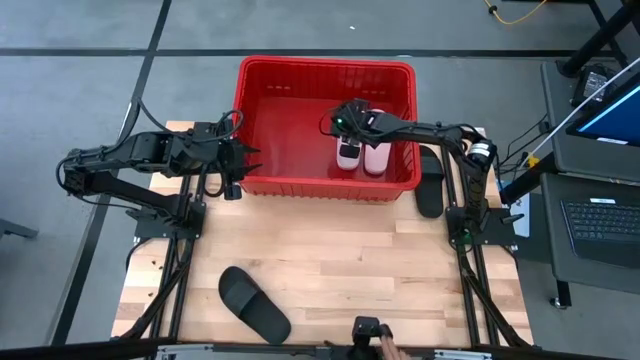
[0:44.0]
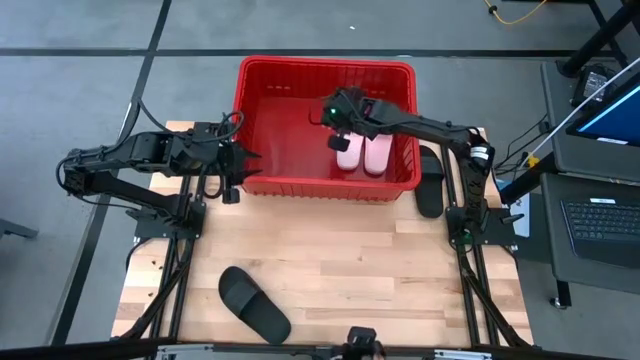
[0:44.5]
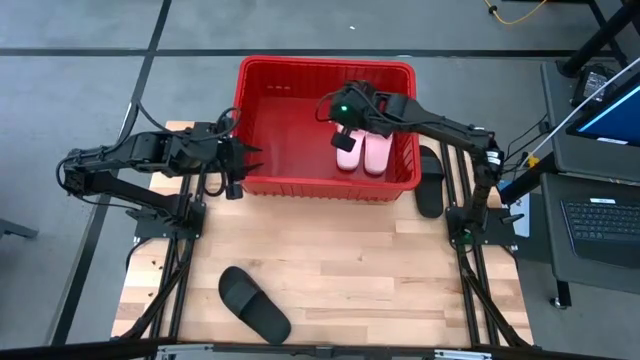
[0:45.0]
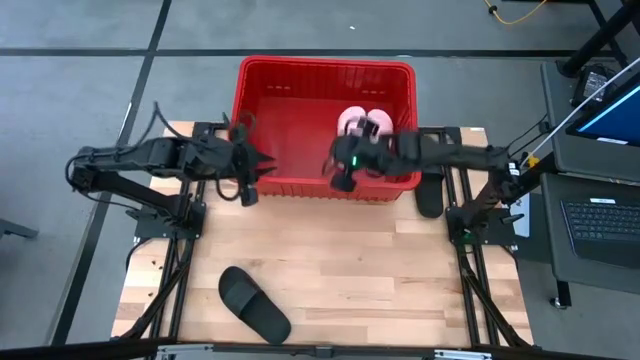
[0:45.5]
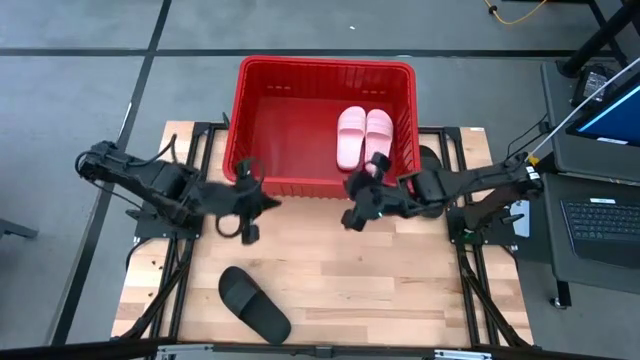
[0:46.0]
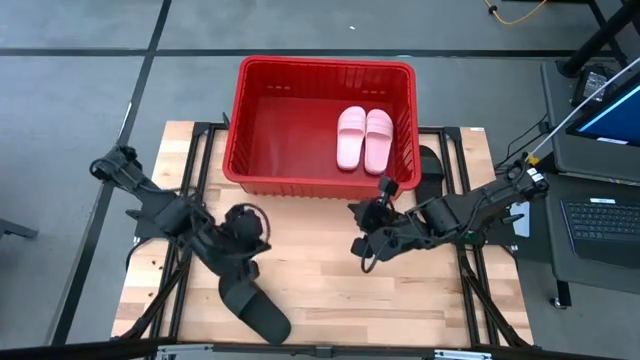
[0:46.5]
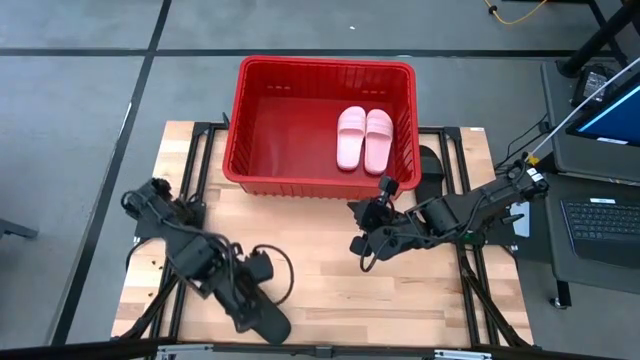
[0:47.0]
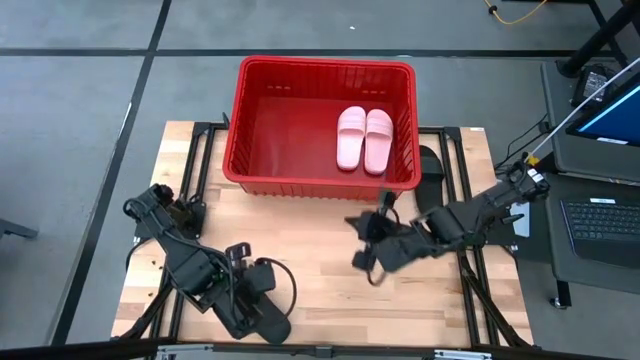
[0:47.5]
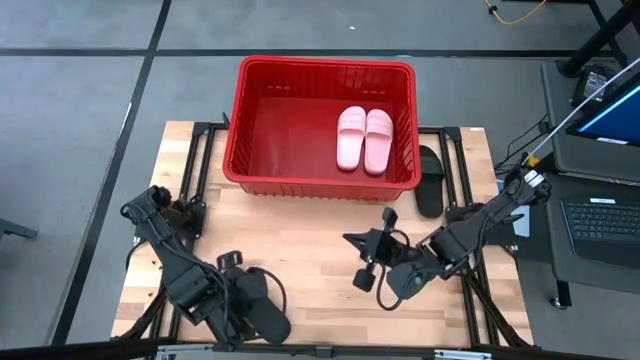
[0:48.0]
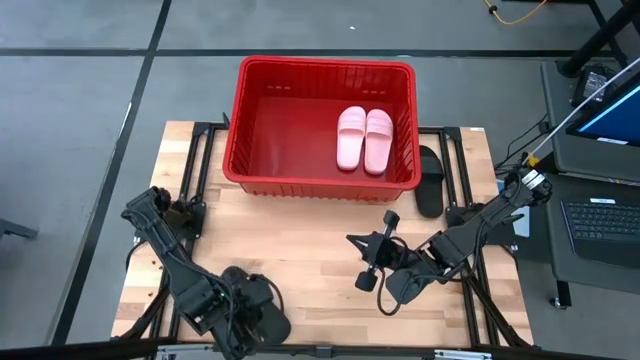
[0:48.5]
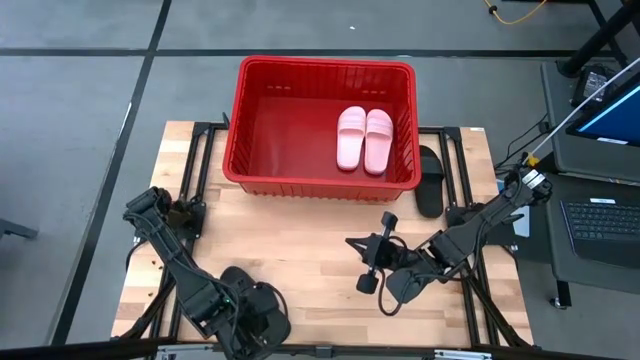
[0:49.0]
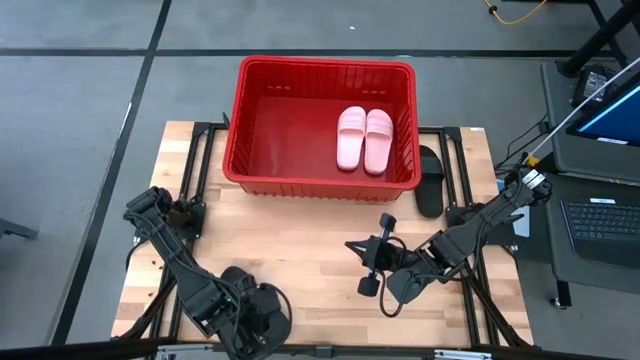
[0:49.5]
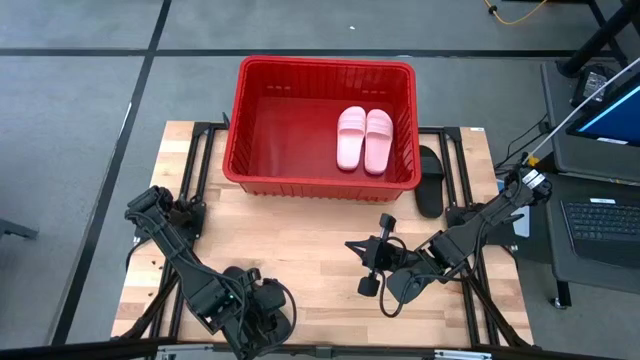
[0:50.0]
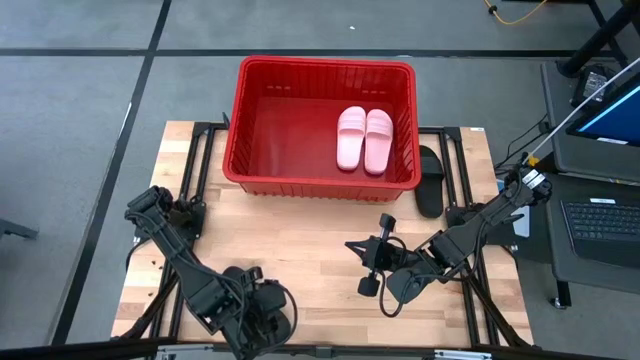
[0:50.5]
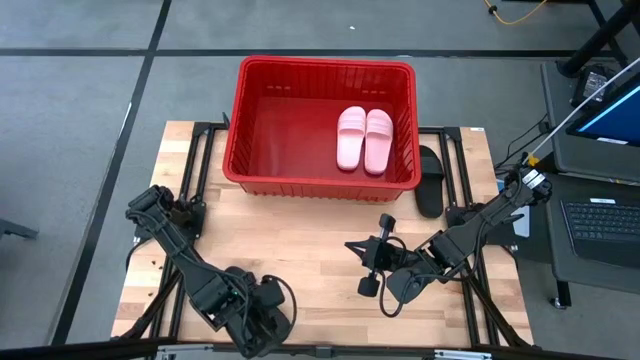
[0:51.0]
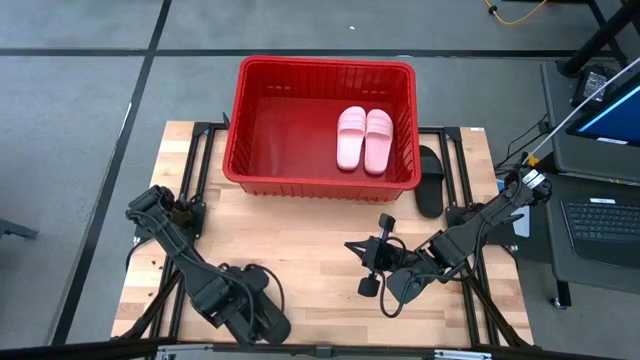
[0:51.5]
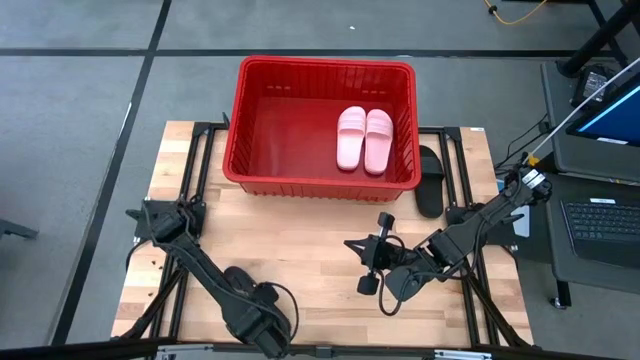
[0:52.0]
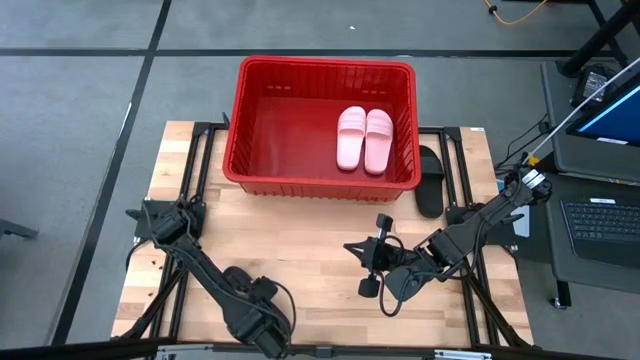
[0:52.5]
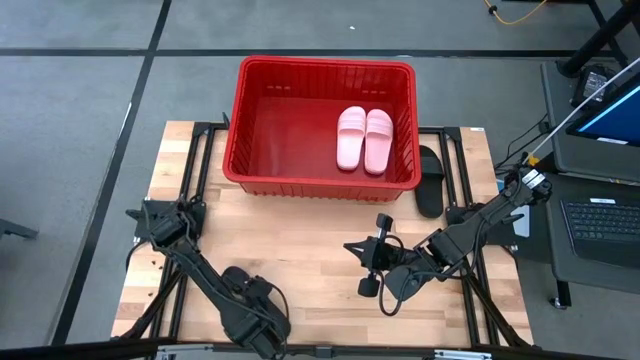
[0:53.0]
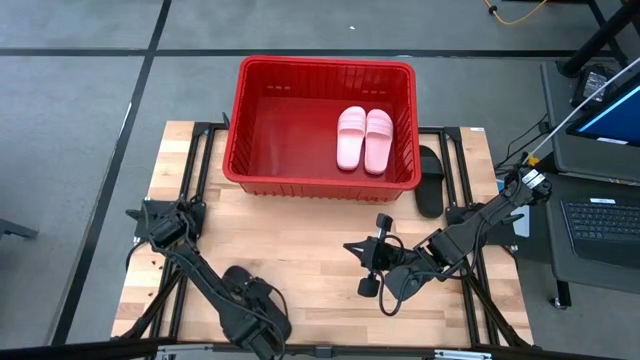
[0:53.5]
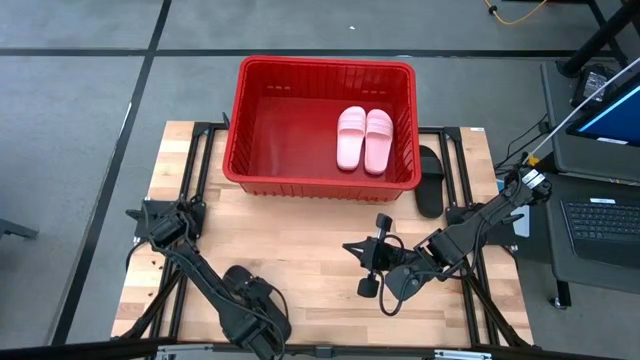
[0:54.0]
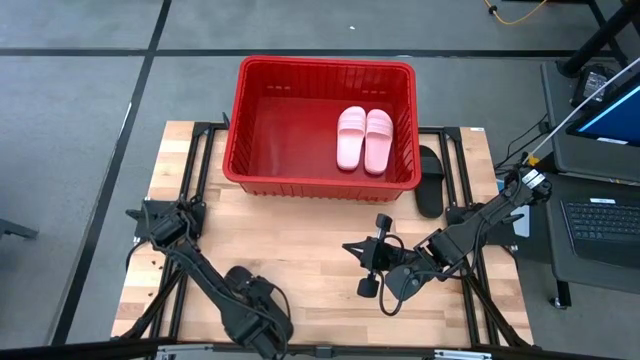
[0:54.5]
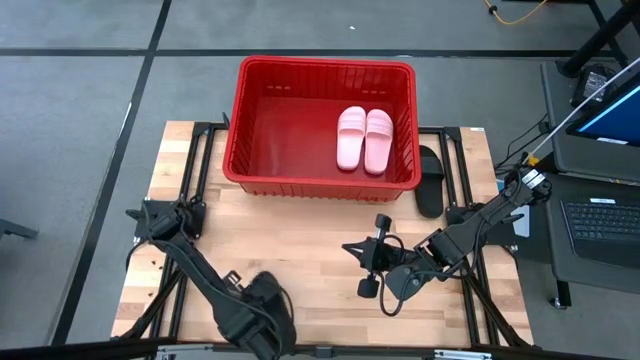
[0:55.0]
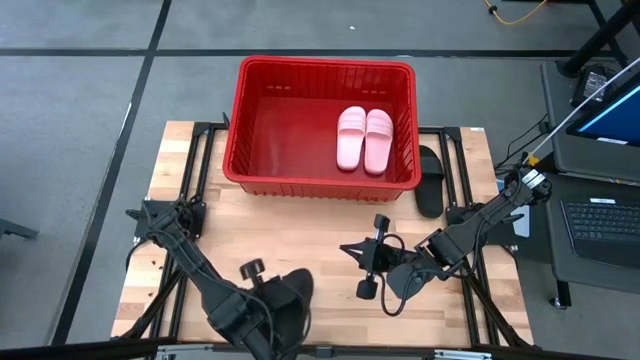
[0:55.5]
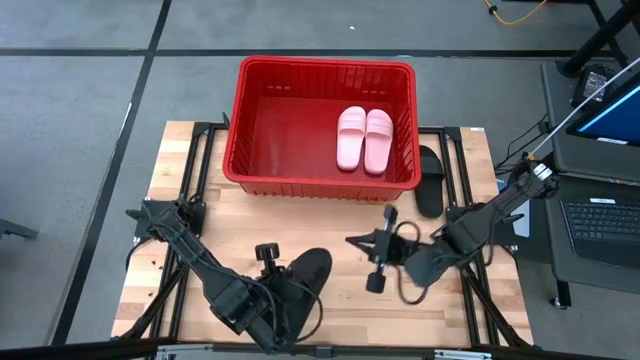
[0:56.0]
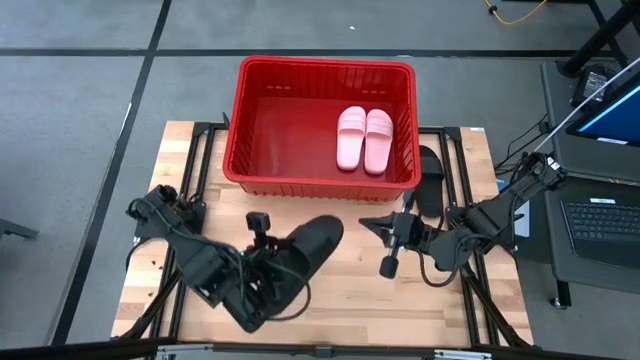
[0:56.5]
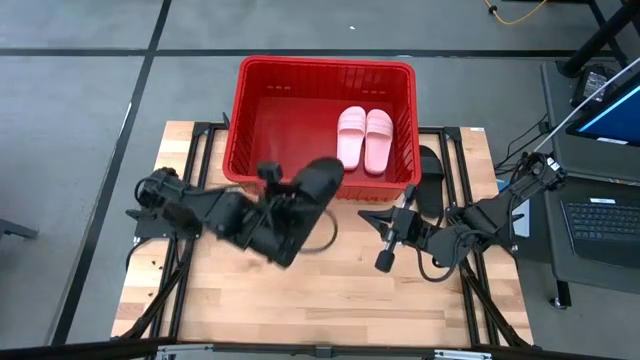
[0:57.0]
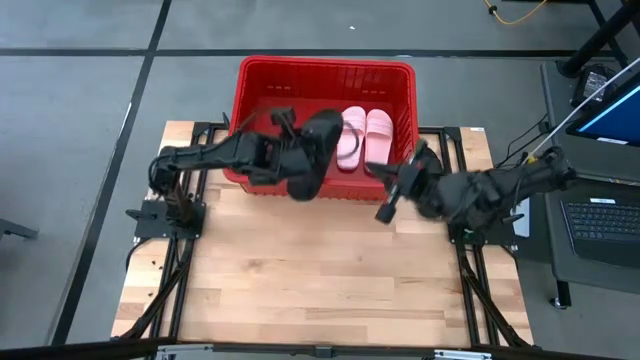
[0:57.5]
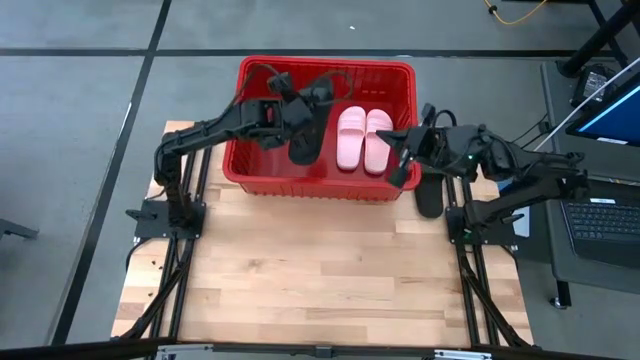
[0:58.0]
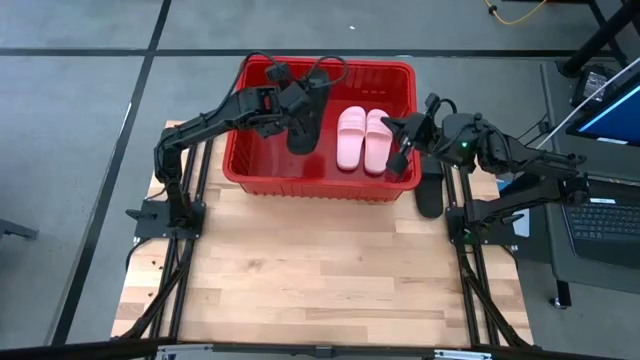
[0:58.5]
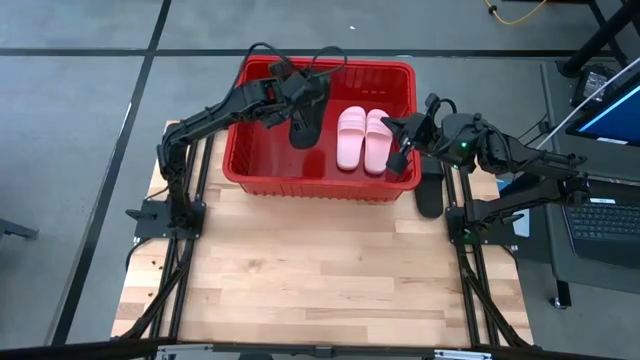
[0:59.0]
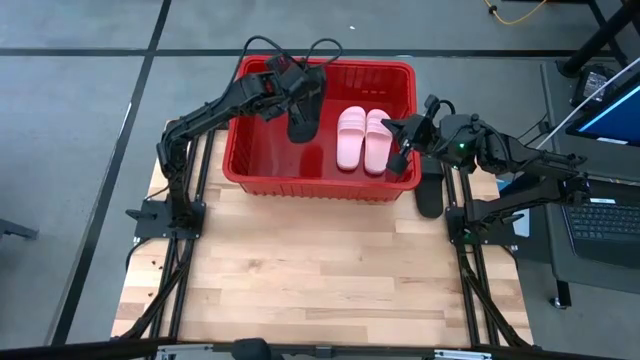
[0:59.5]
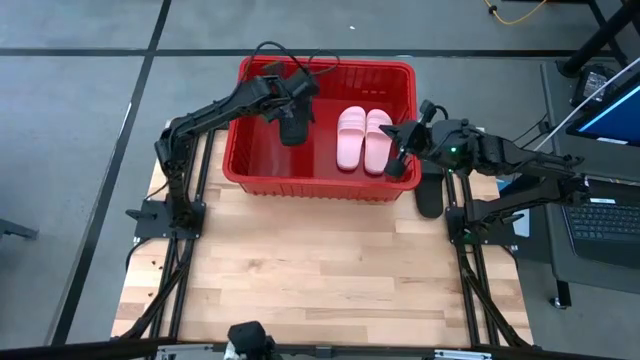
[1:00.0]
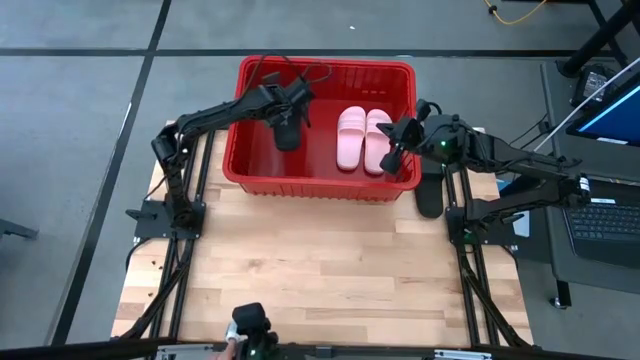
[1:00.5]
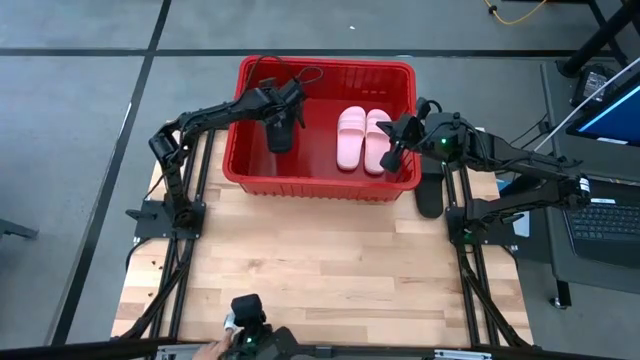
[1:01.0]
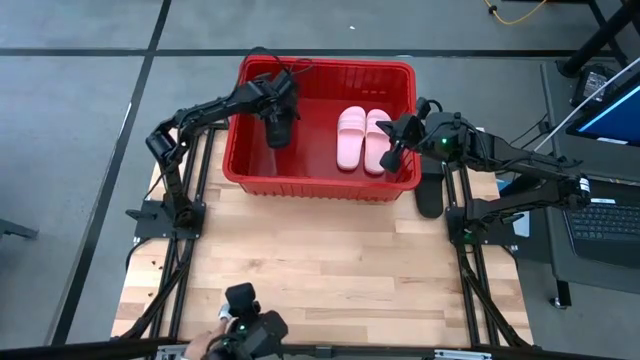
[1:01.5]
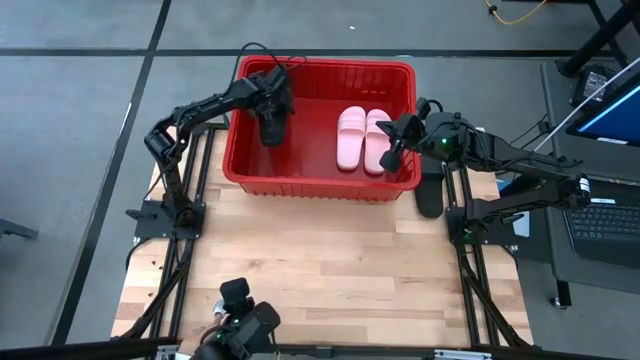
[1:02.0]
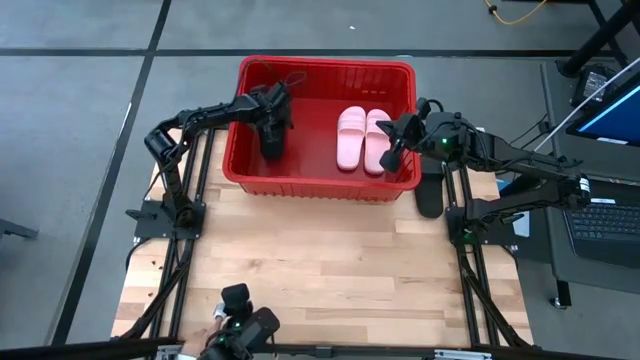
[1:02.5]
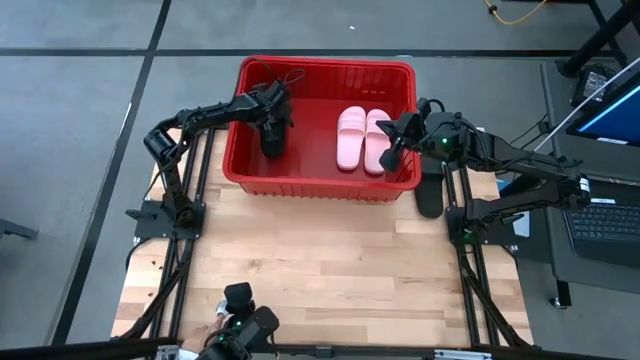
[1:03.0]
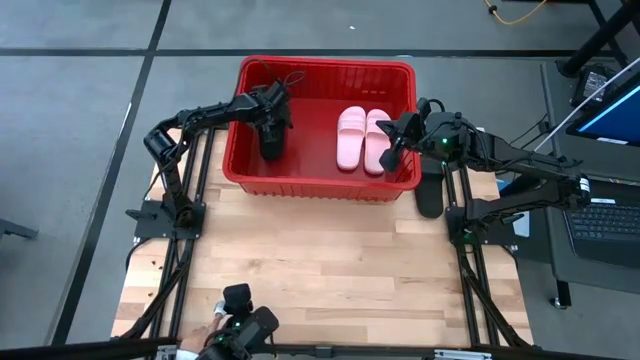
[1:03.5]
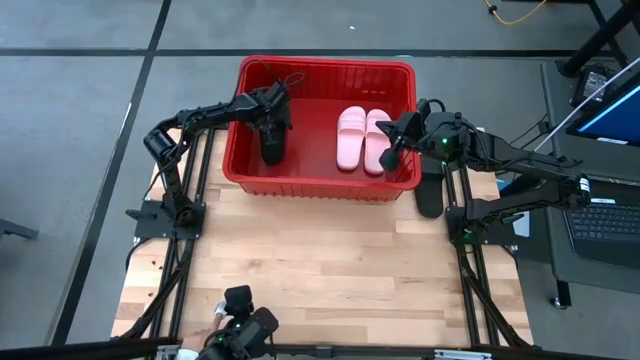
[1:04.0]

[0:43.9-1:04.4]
Task: Pick and place slides into bin
Put the bottom black slide into the bin

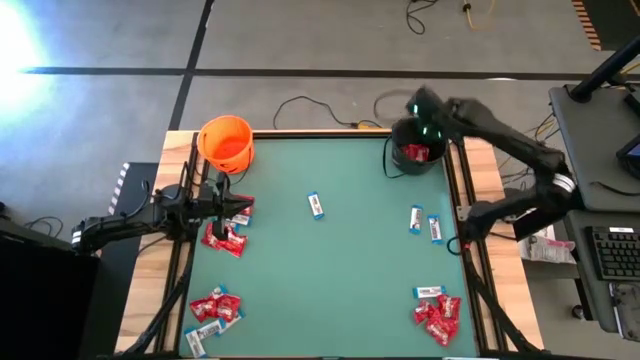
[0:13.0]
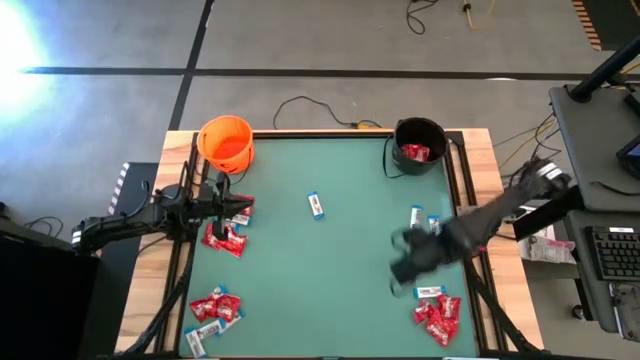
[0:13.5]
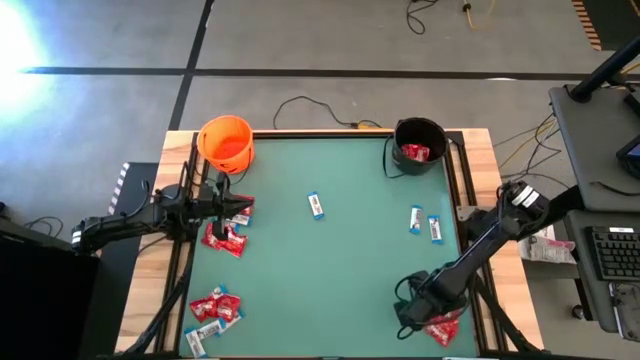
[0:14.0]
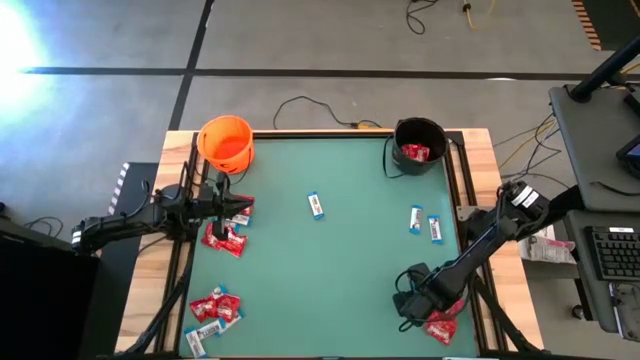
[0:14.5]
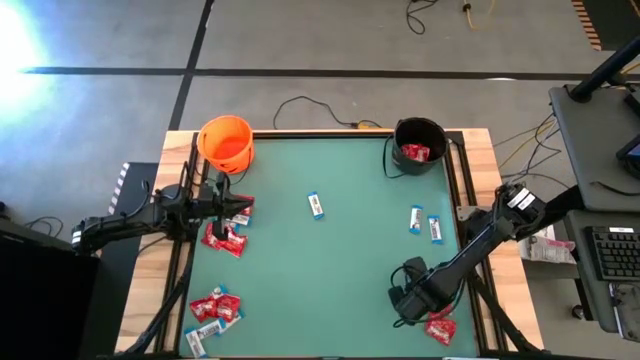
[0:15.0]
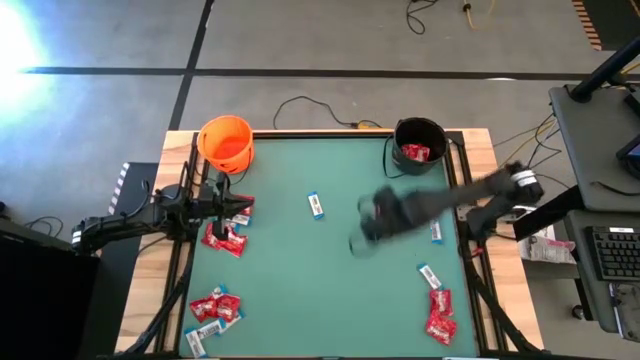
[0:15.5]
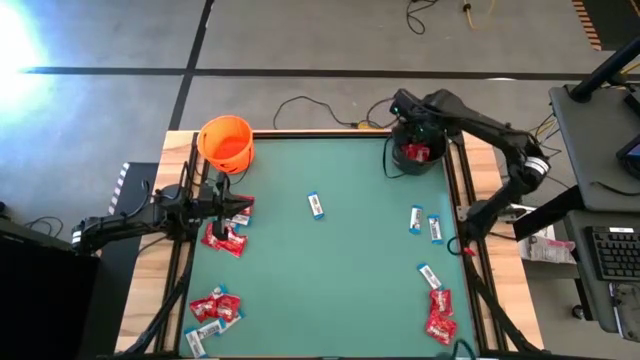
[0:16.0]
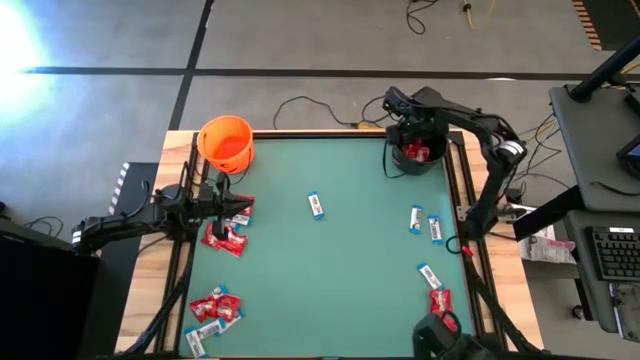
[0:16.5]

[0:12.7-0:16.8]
Task: Sort candy by brand, put in halloween buckets
Put the red candy into the black bucket
